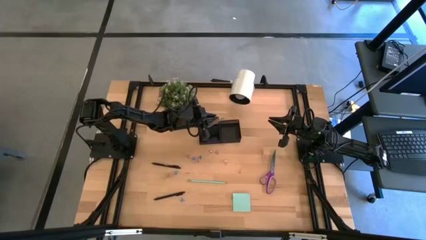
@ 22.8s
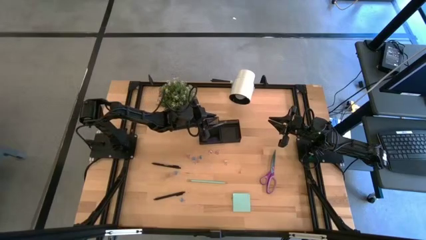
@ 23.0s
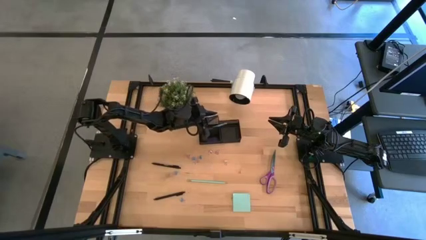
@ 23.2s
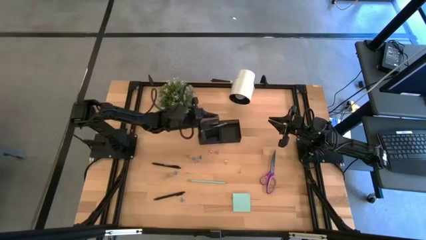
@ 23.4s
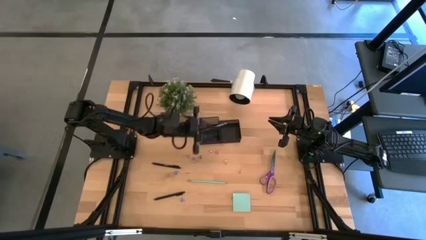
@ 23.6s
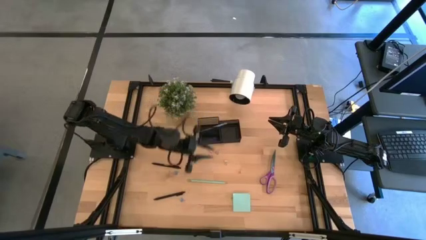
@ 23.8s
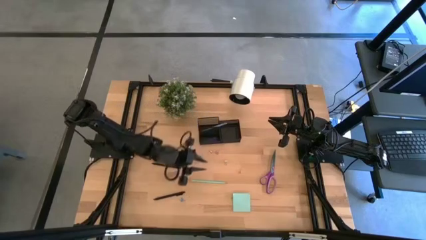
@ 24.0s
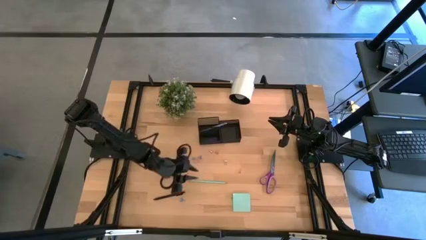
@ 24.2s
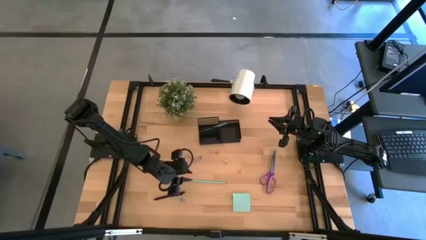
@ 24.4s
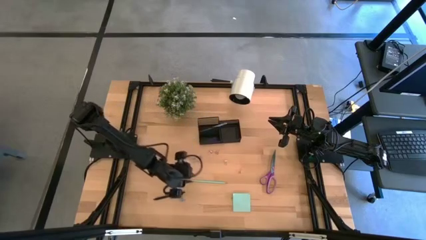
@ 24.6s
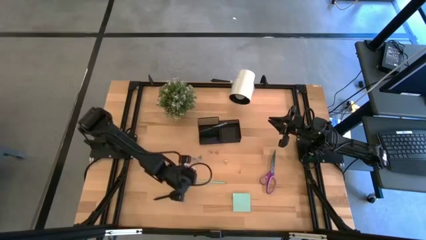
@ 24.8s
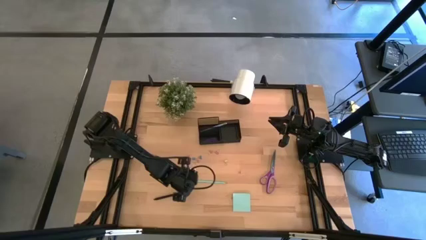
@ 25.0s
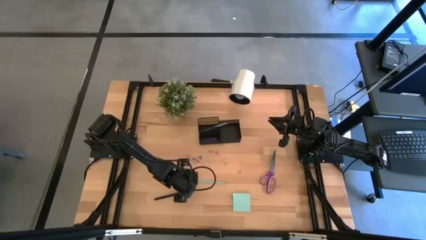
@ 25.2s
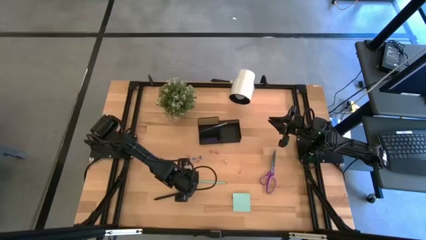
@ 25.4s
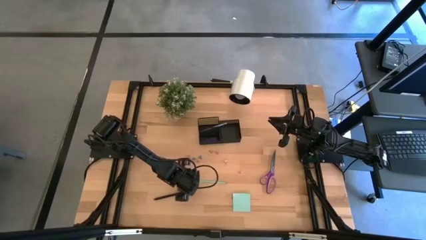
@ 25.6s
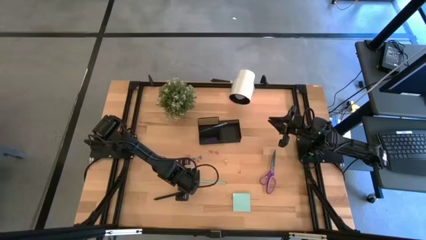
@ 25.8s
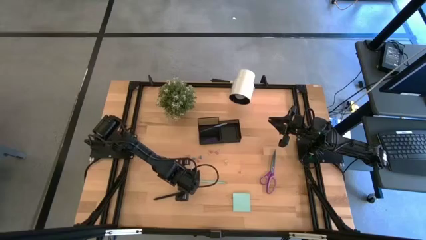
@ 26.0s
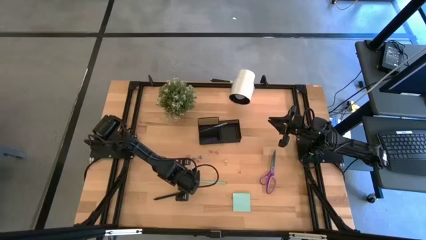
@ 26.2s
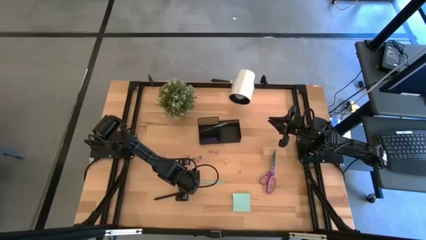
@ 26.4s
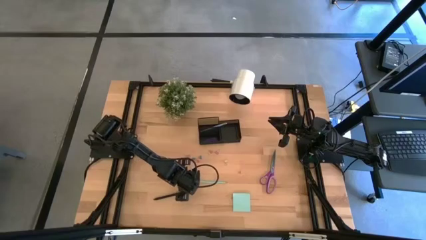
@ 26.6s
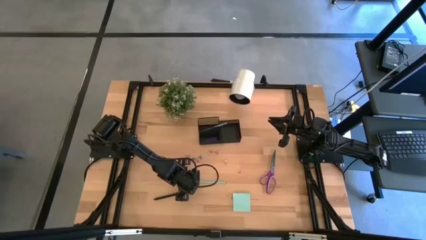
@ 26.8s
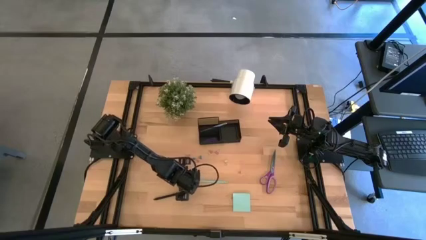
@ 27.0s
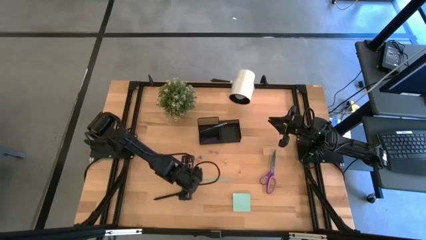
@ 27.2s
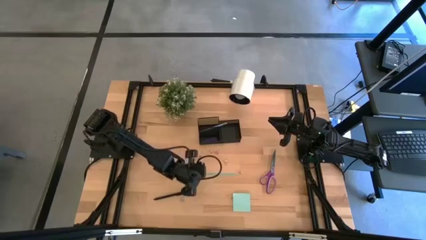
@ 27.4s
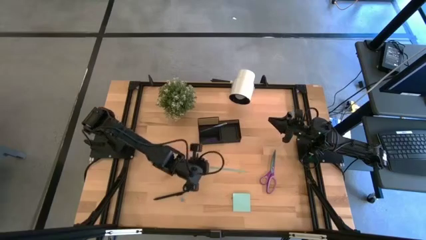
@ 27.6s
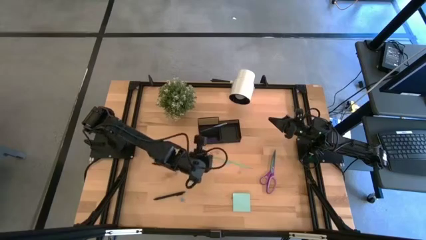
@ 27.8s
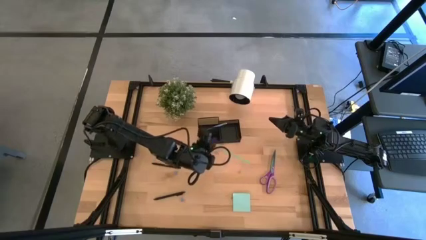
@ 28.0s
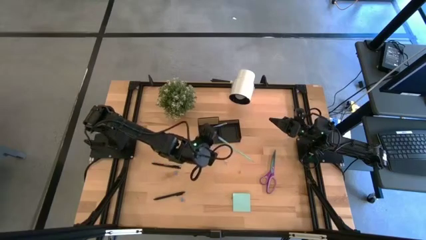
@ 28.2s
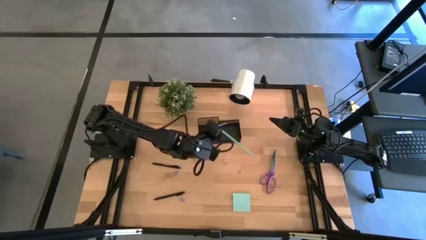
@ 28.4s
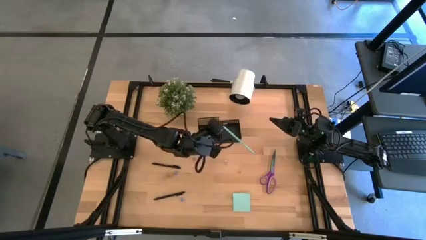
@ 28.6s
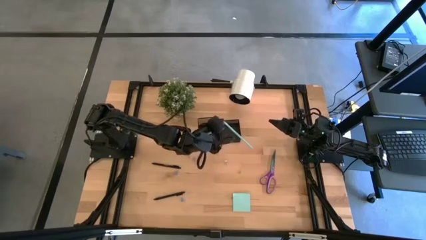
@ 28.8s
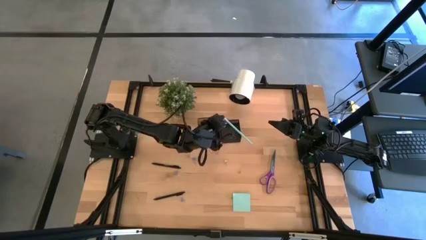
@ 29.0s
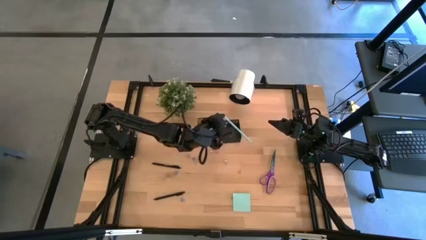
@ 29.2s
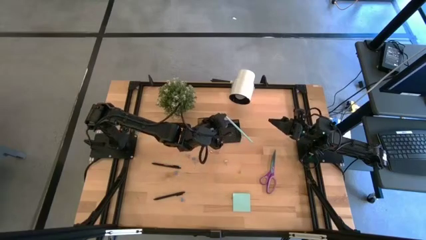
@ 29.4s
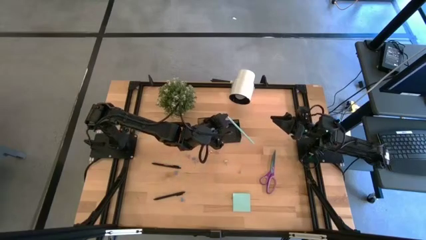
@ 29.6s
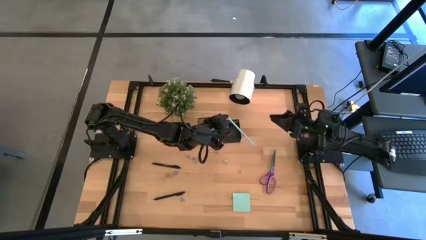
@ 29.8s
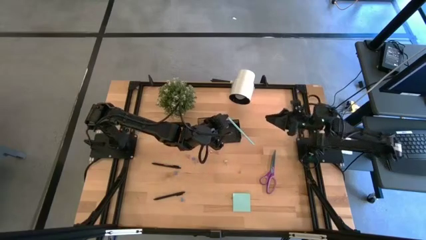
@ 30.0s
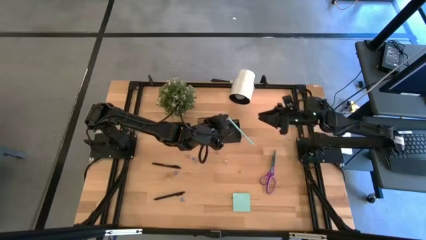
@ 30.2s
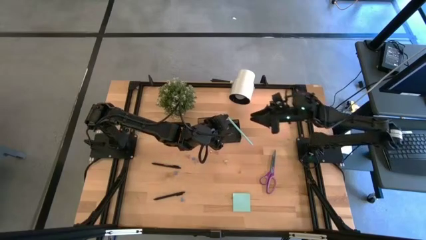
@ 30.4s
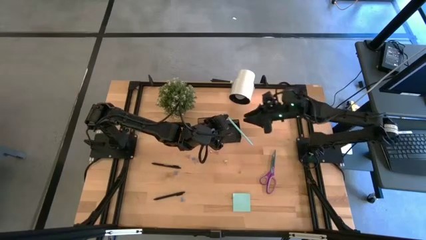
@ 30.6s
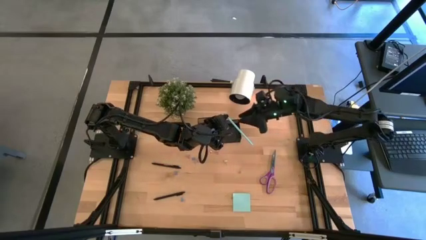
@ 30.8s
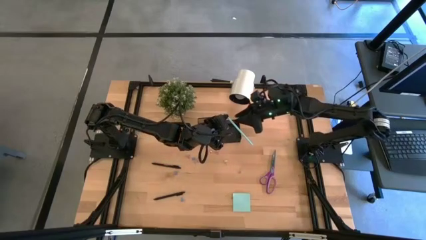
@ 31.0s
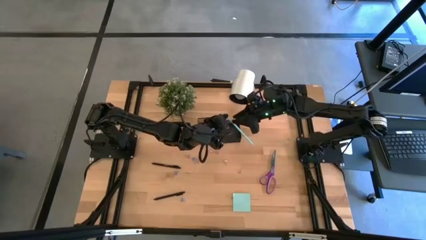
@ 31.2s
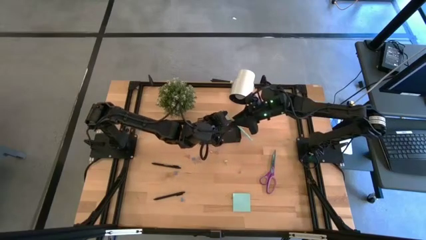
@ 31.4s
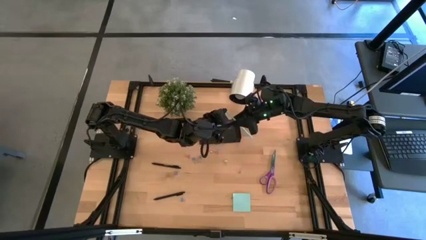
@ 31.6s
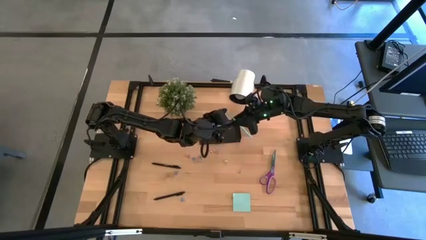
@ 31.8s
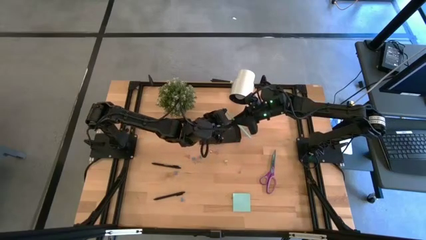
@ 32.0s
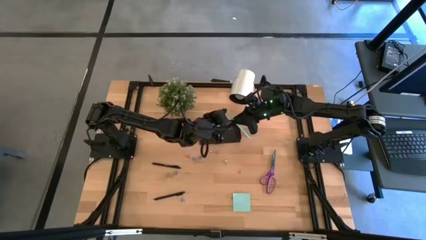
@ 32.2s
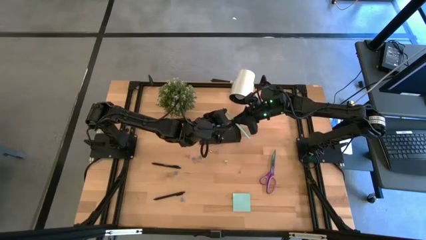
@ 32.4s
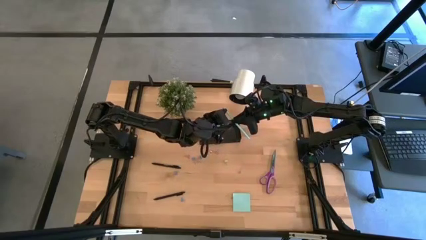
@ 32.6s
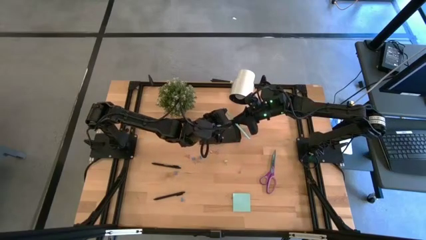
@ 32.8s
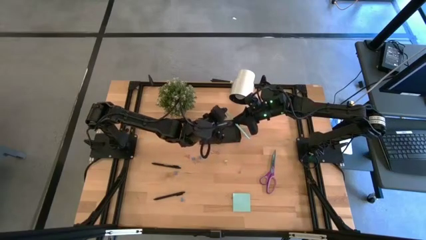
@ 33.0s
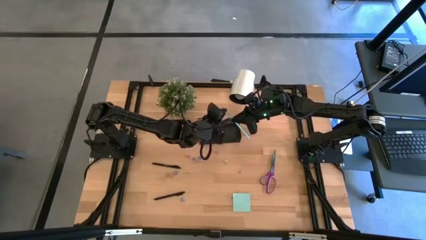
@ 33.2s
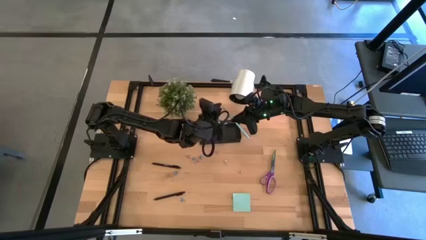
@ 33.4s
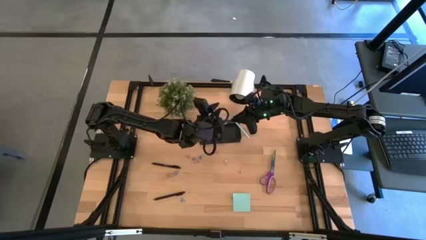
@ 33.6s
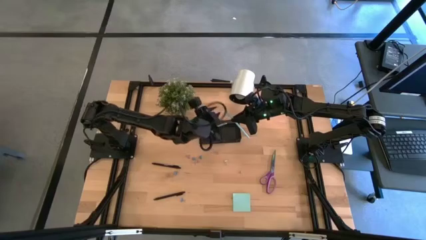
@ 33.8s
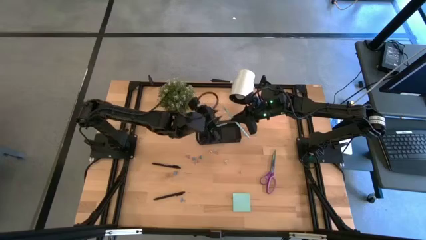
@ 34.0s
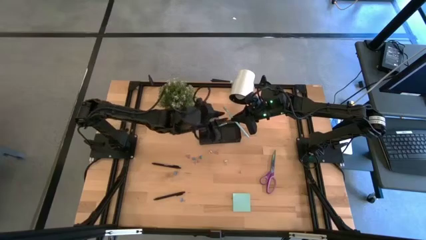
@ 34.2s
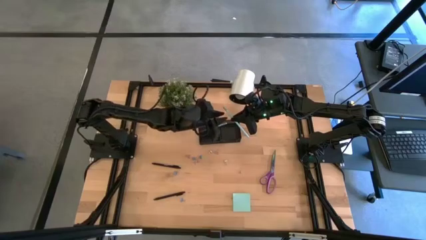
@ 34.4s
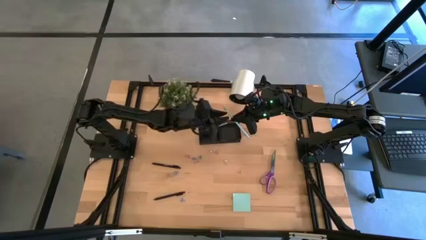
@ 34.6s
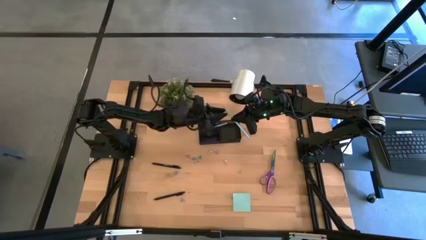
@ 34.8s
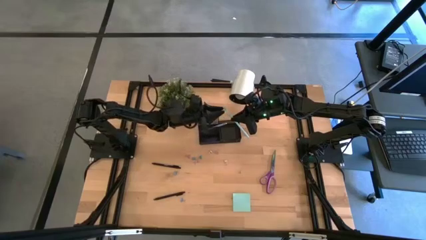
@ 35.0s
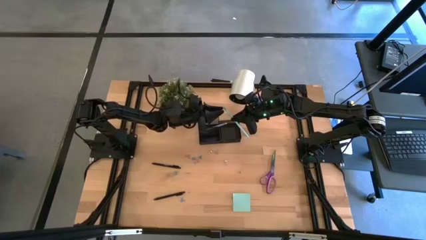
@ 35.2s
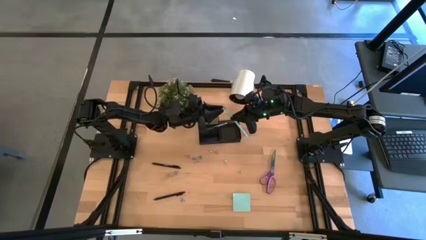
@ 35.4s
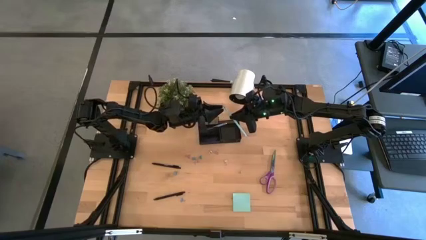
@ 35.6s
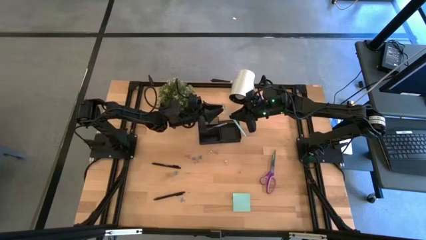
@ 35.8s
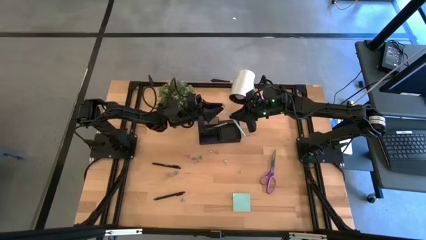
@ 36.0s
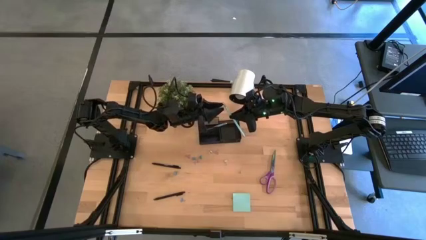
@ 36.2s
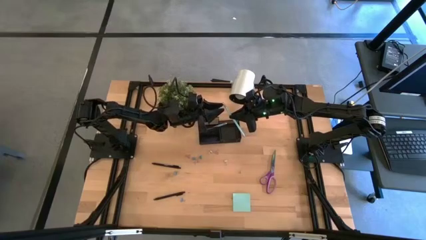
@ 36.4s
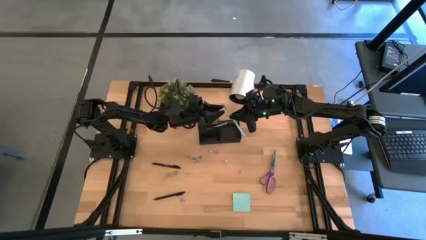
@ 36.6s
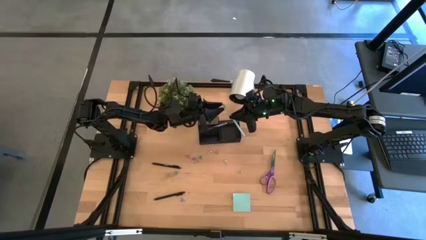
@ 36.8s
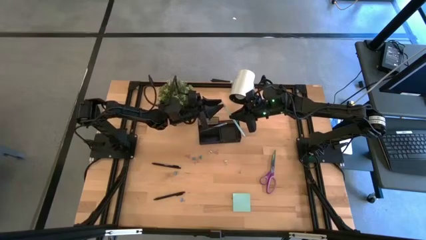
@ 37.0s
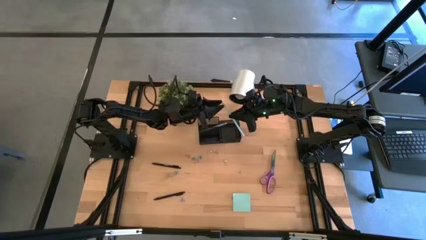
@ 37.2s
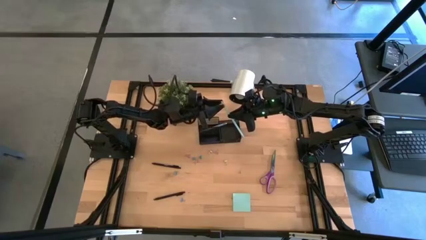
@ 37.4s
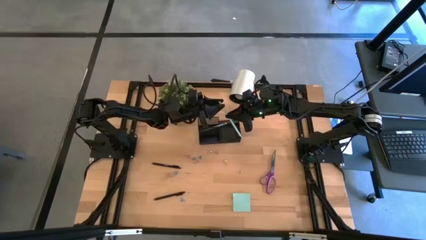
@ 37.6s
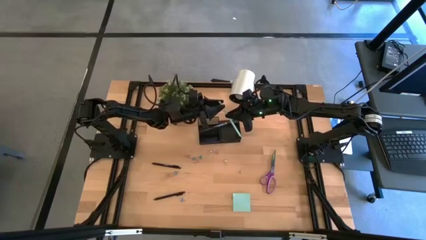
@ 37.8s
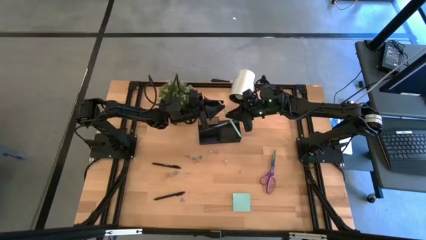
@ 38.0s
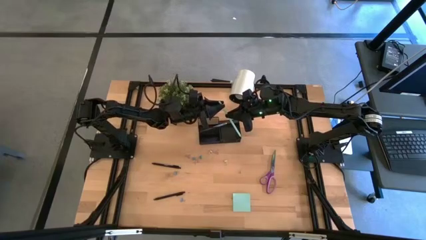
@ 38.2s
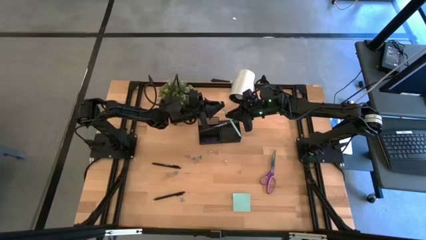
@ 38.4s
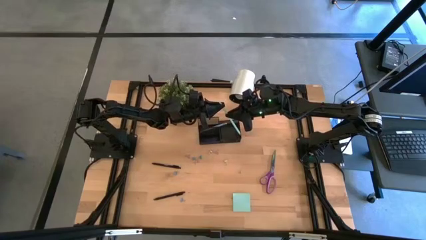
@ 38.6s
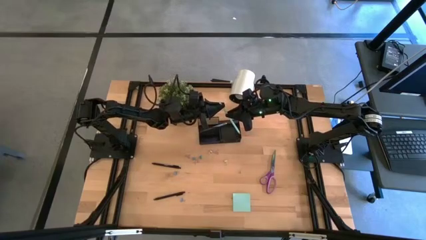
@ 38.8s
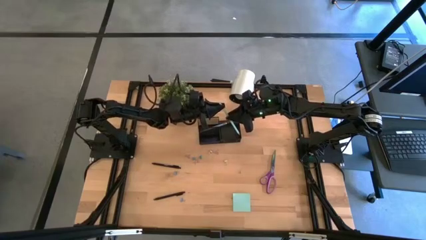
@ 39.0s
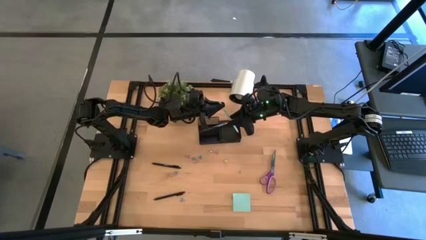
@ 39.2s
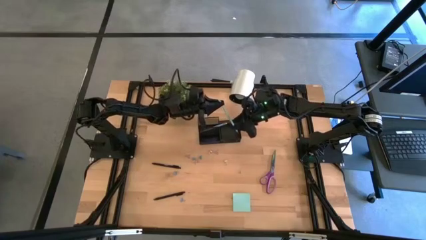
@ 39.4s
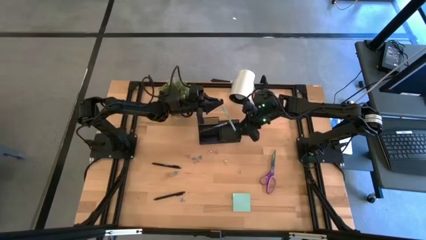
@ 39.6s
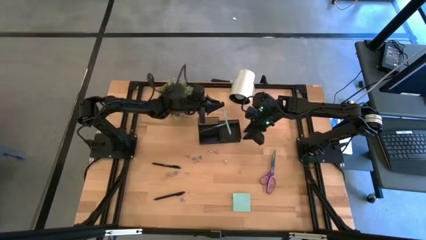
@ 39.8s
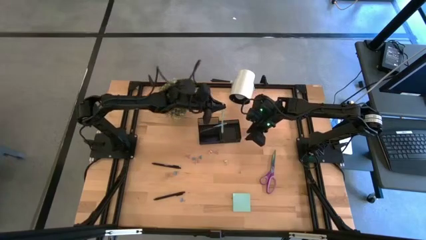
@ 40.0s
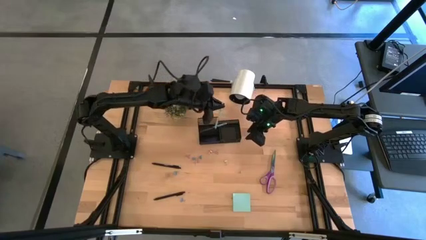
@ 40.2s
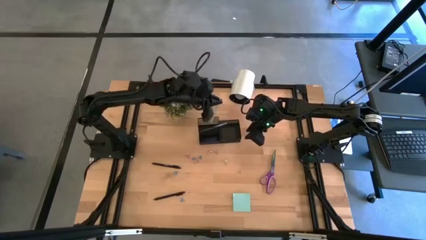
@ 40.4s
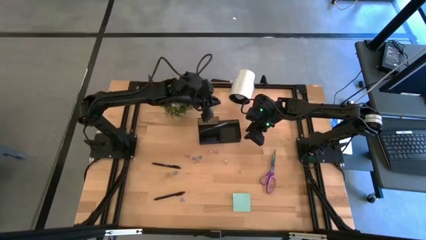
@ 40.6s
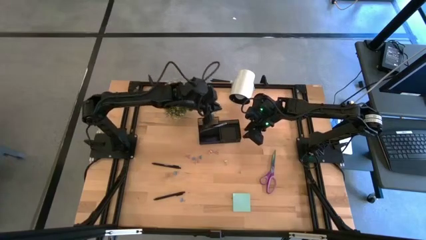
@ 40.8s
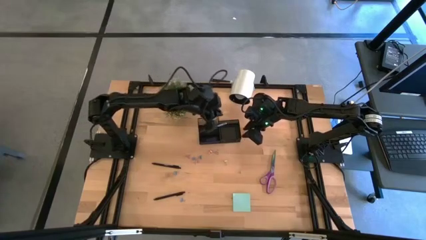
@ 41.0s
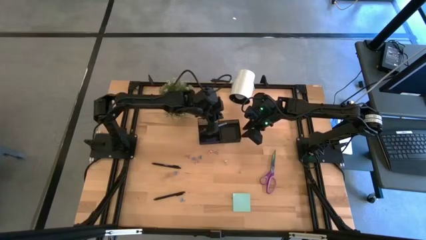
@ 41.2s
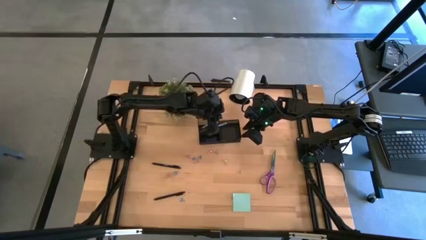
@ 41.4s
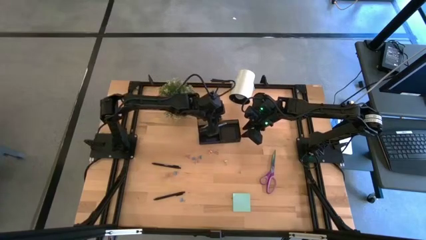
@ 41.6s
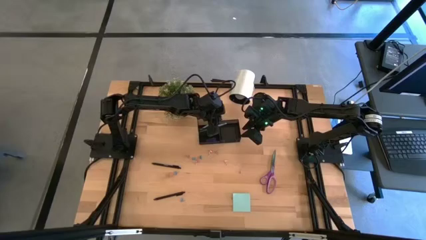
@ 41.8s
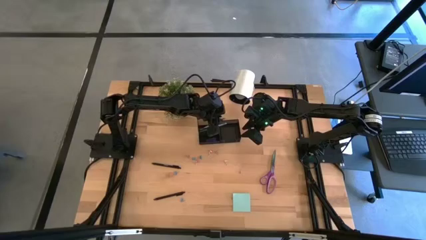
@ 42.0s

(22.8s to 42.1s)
Task: Pick and place office supplies into organizer
Put the green pencil into the black desk organizer
